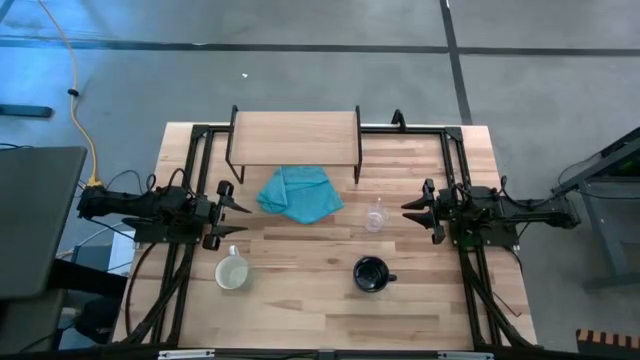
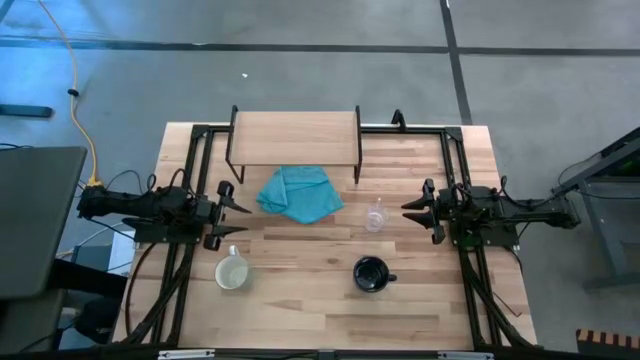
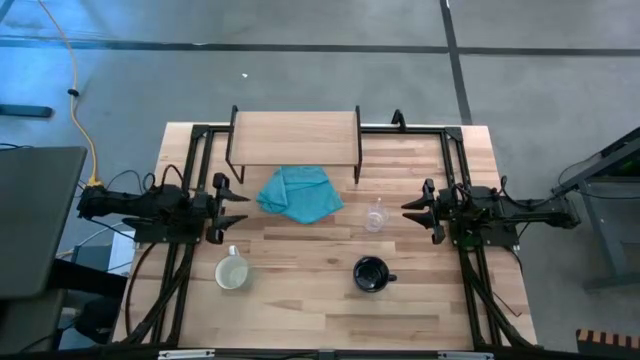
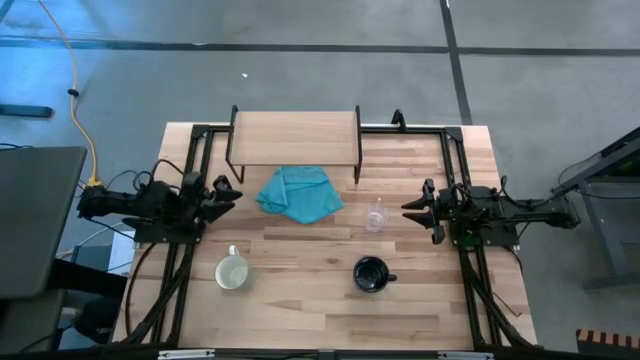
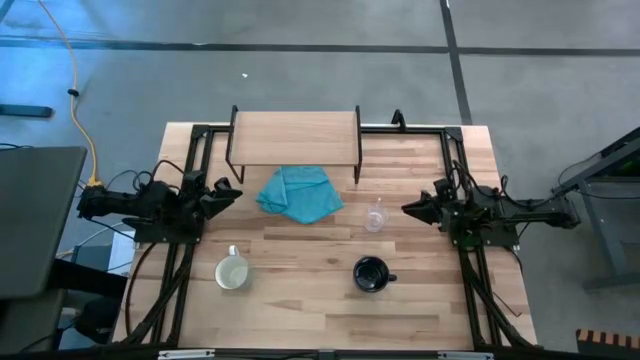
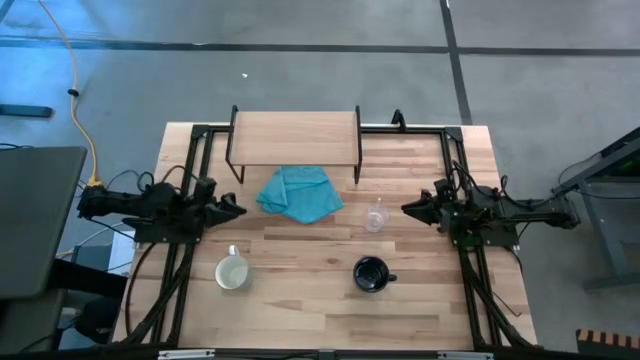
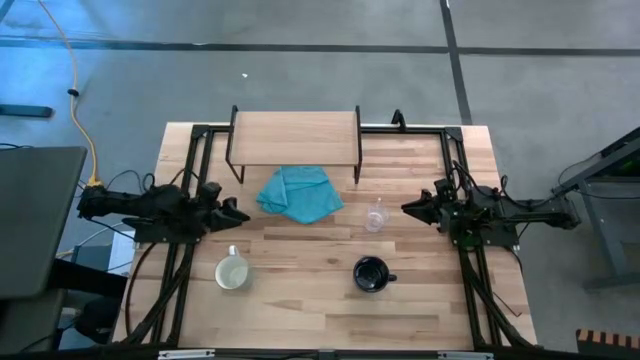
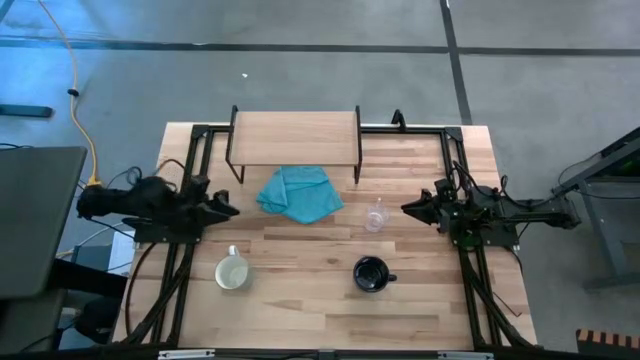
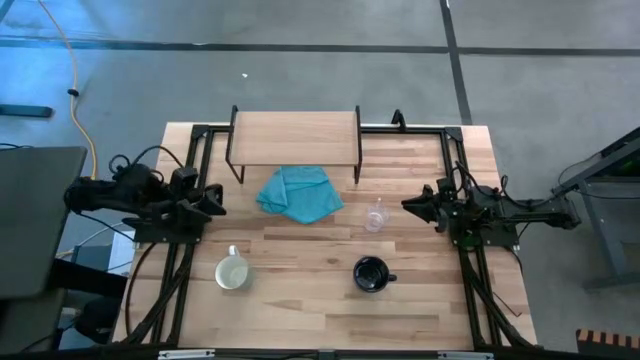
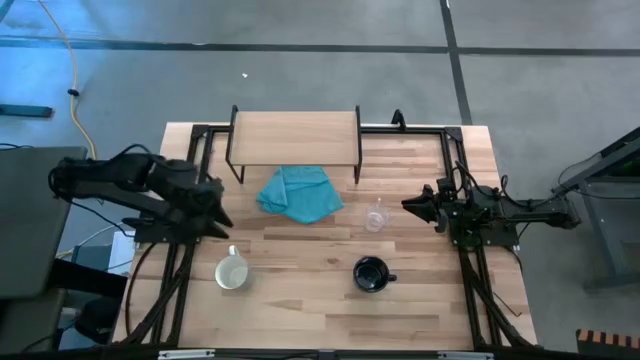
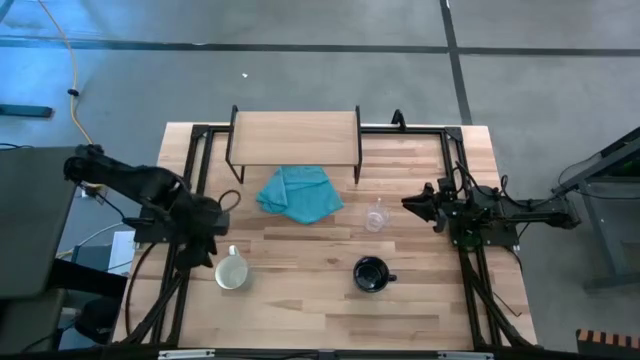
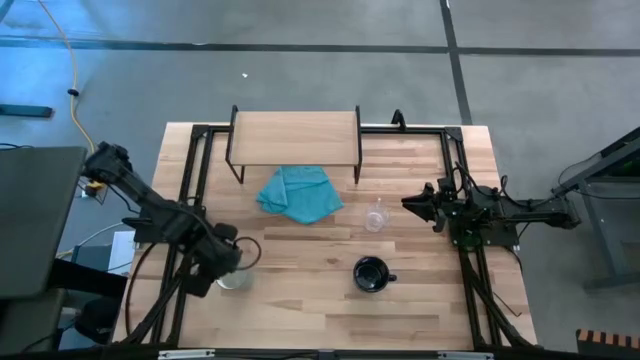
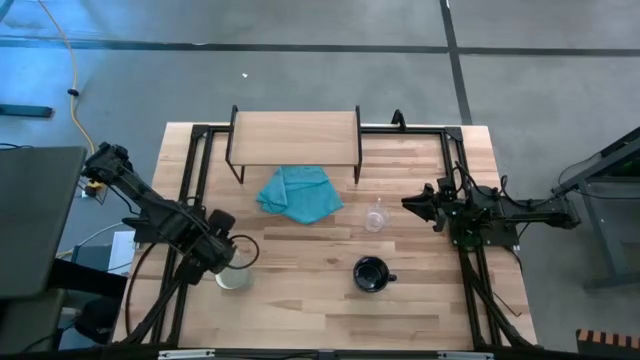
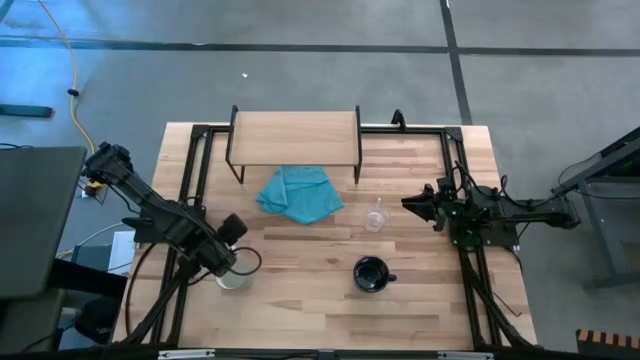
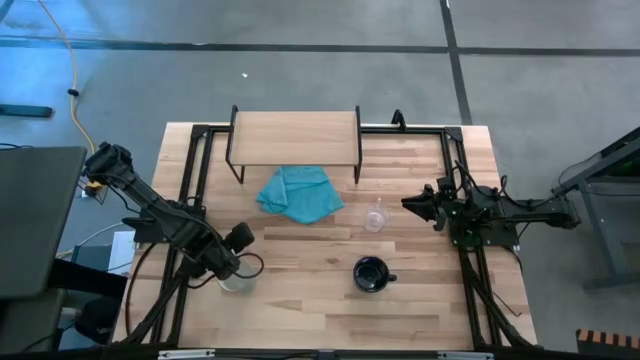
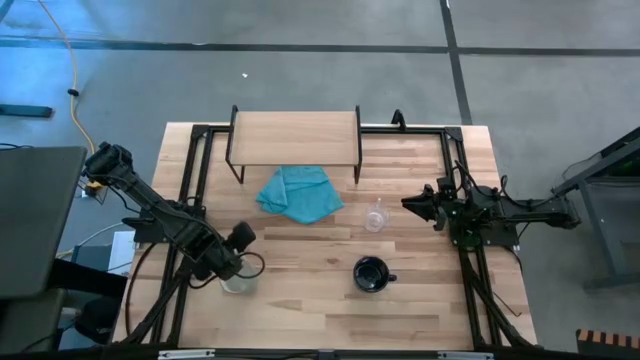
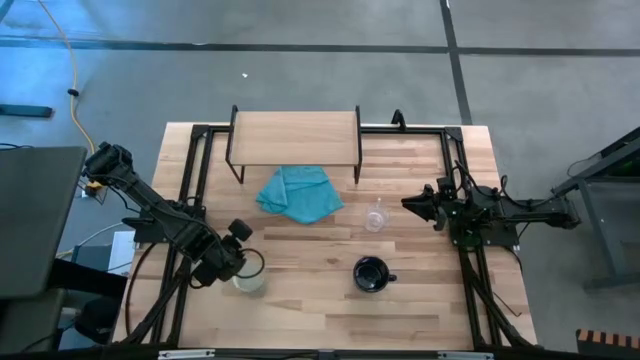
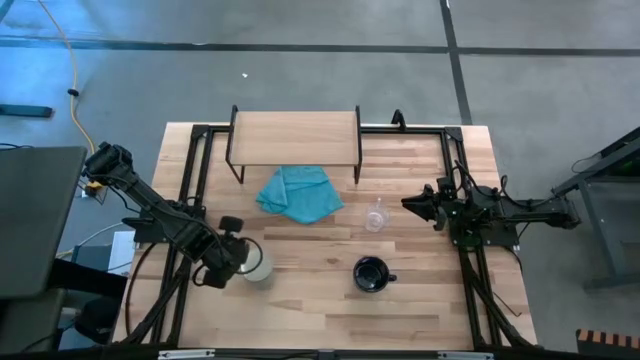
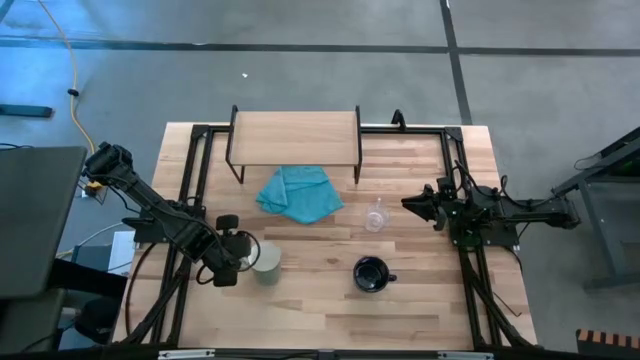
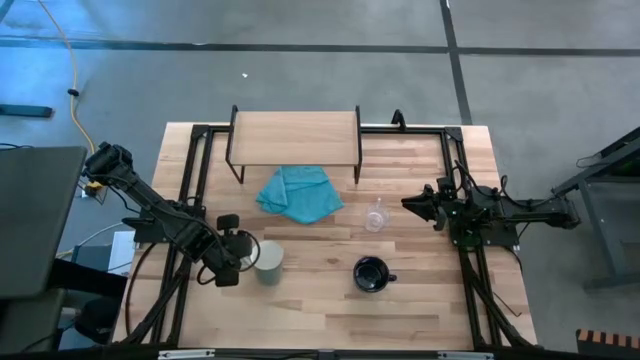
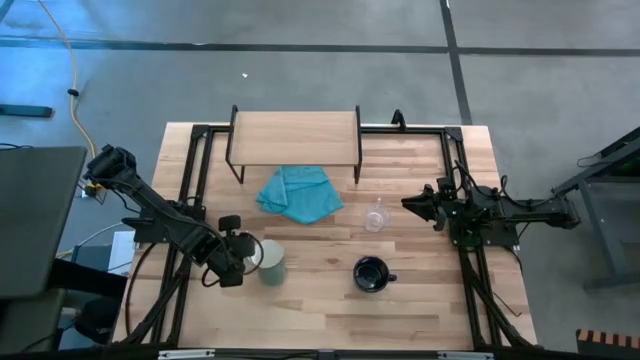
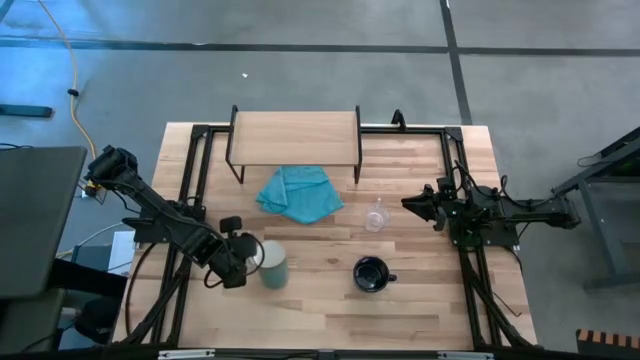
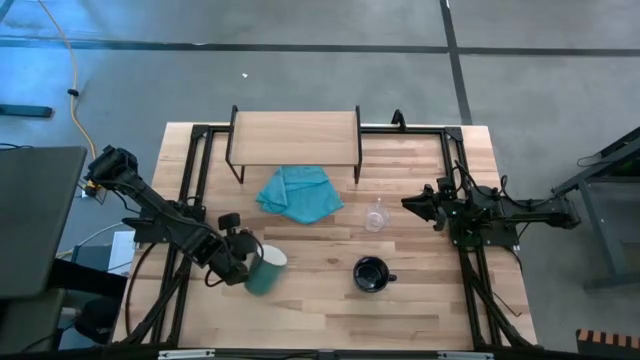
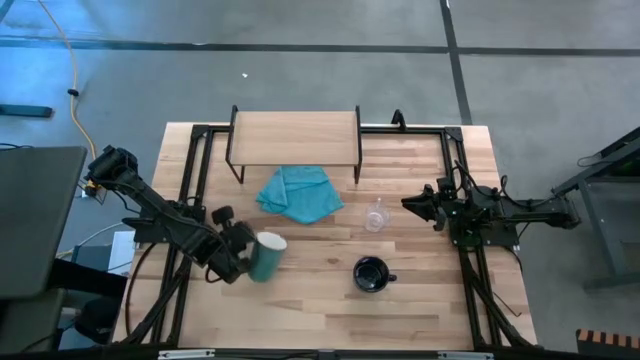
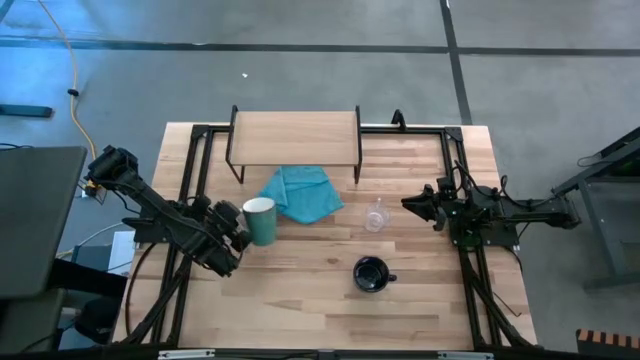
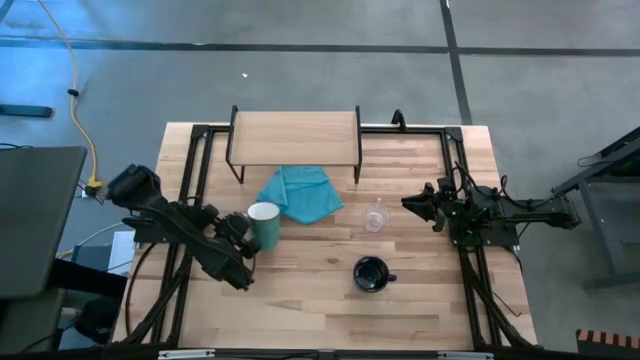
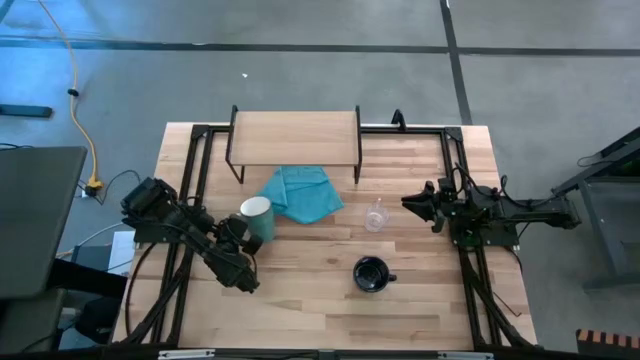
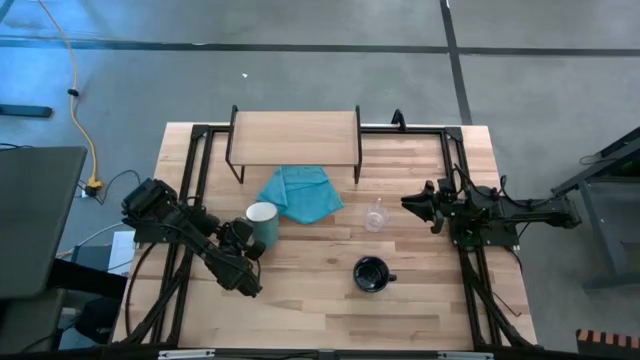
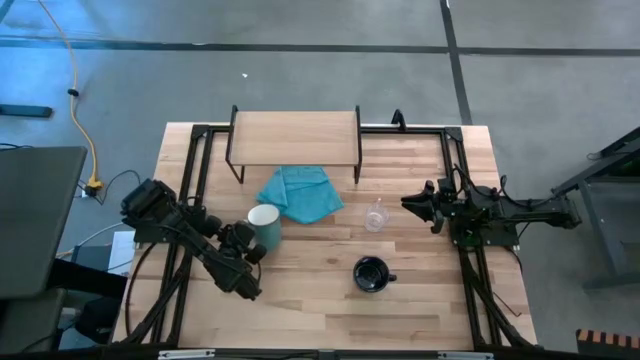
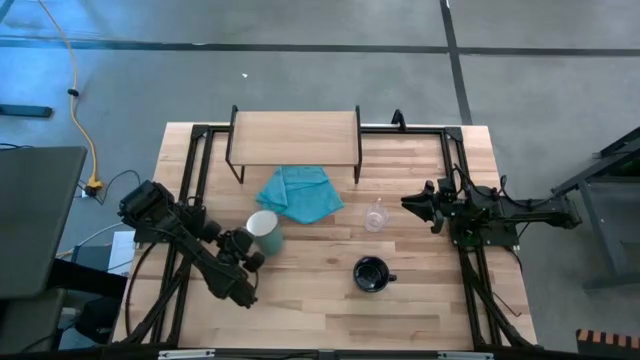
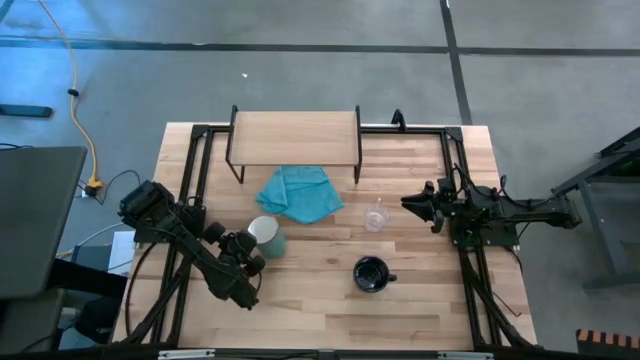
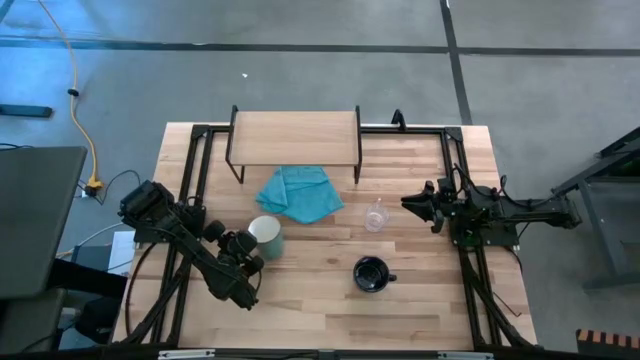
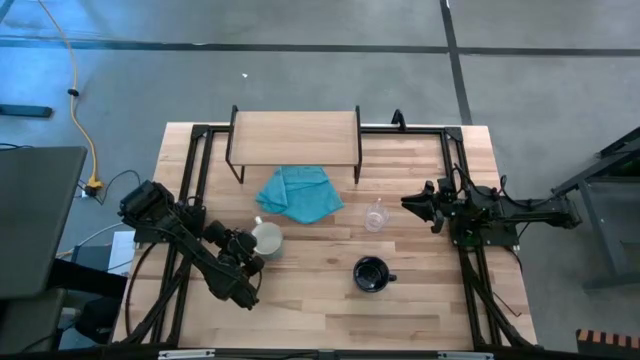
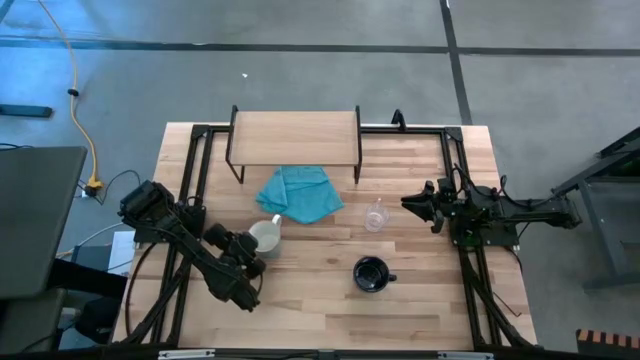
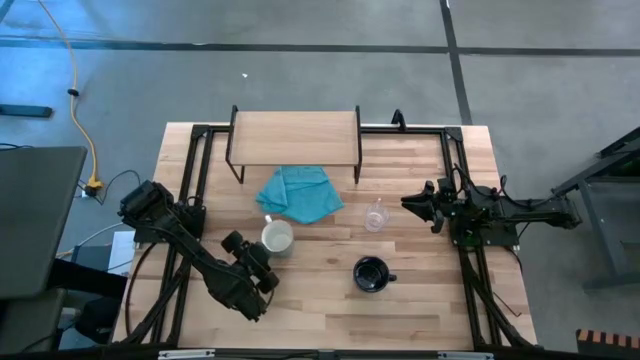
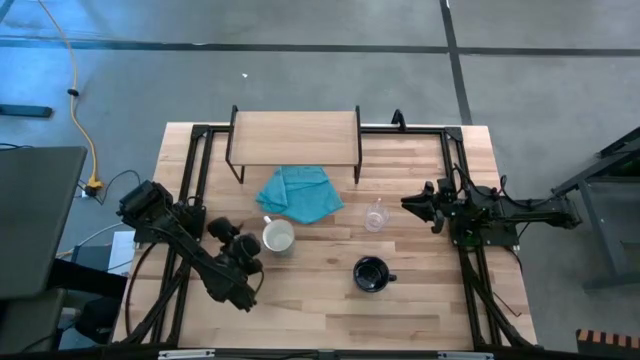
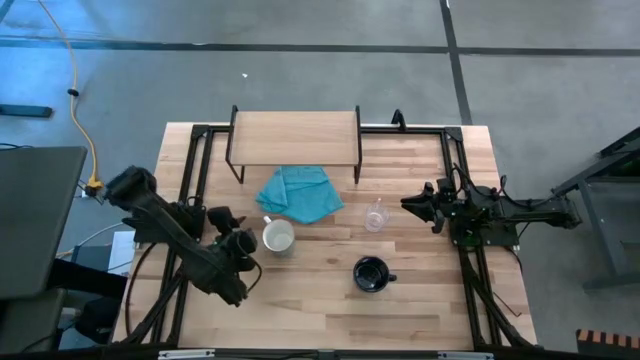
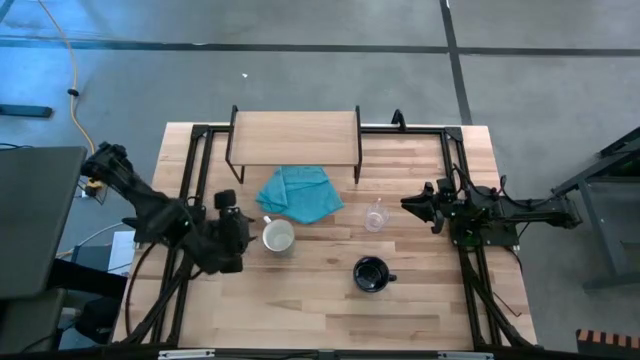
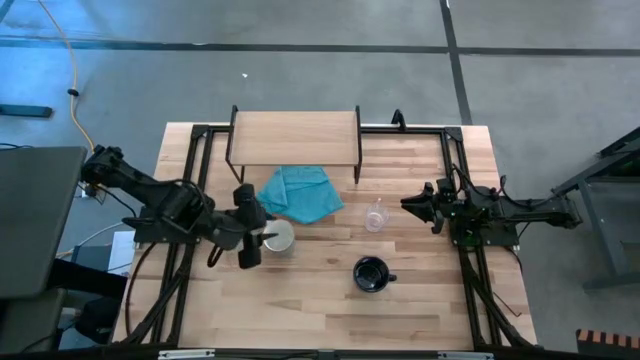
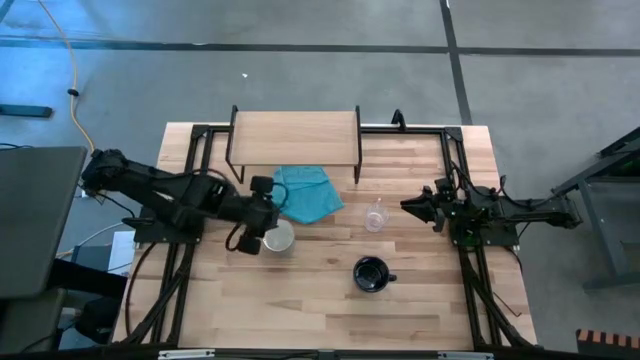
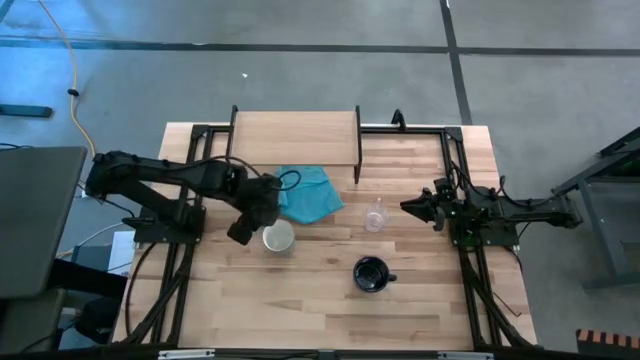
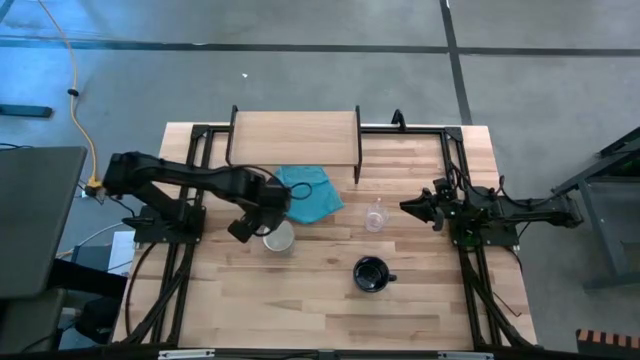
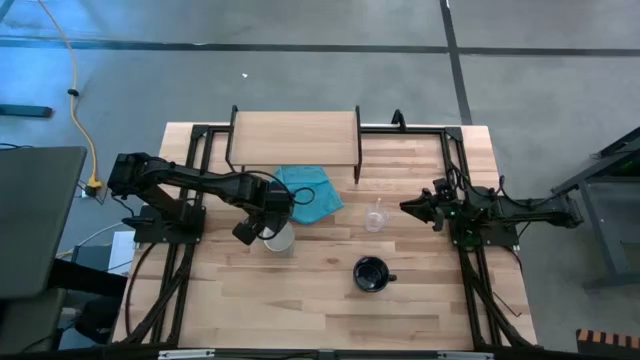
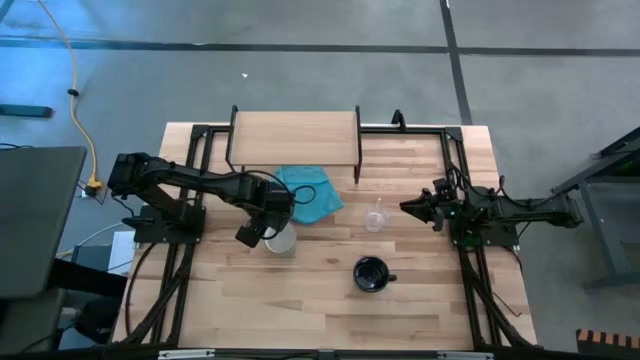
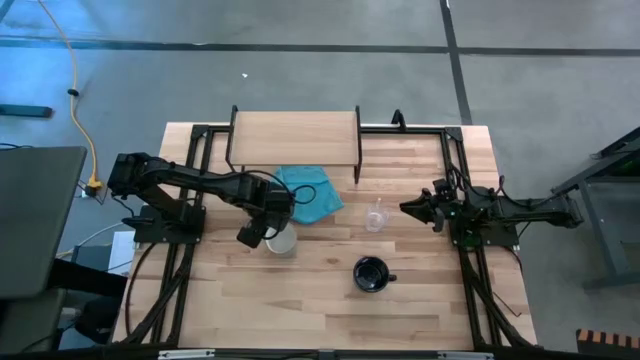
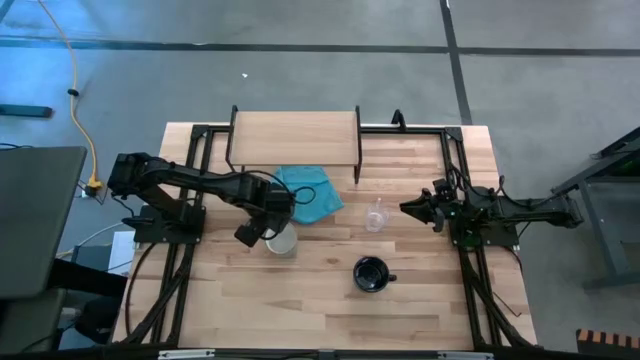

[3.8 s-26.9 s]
Task: Stack small to large cups/mugs on shelf
Put the light blue mug on the shelf
